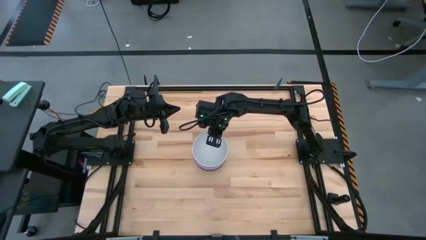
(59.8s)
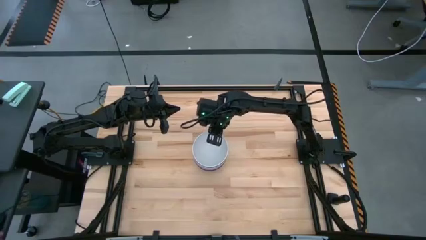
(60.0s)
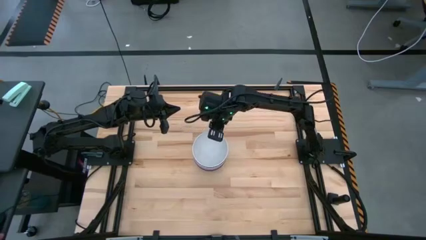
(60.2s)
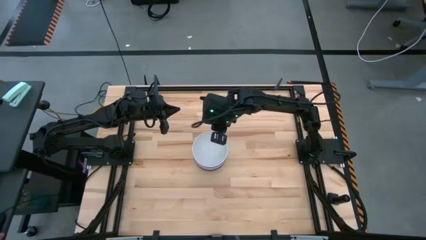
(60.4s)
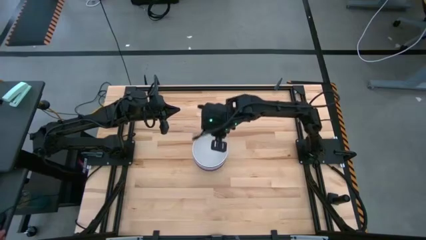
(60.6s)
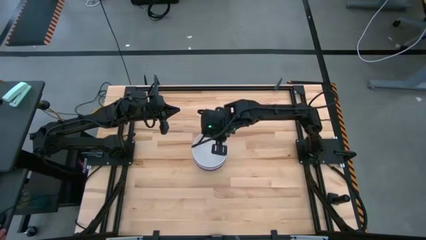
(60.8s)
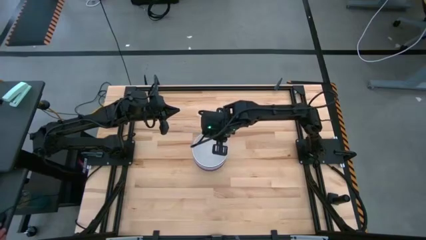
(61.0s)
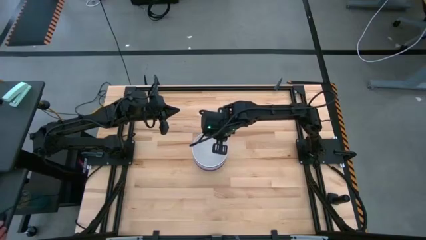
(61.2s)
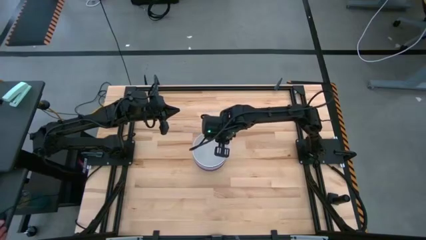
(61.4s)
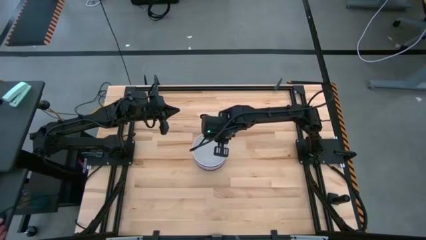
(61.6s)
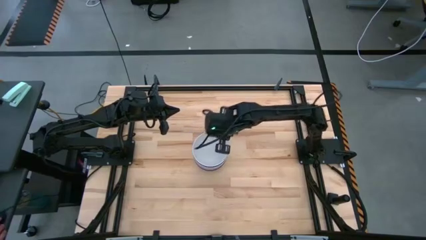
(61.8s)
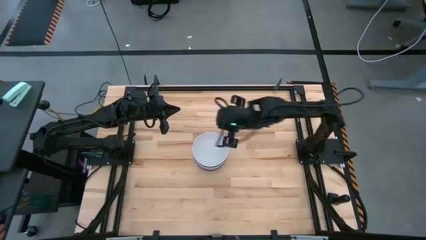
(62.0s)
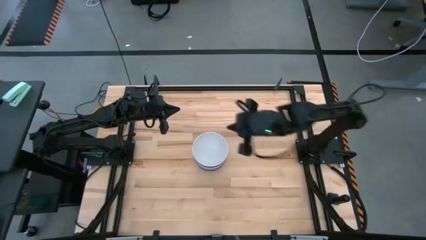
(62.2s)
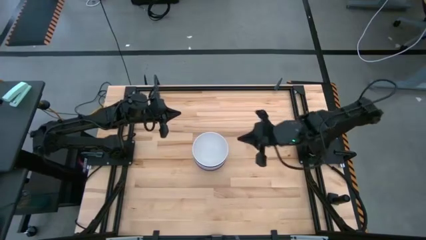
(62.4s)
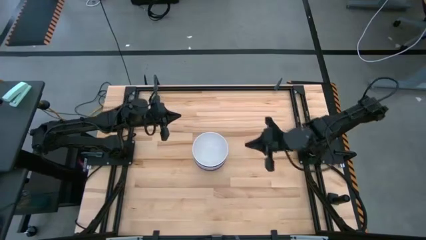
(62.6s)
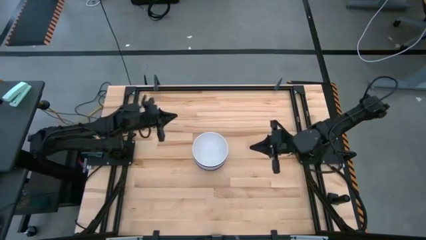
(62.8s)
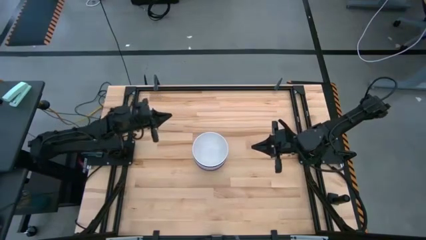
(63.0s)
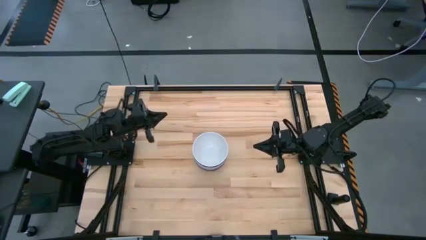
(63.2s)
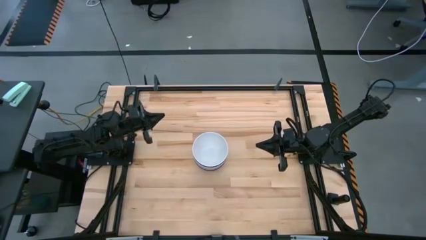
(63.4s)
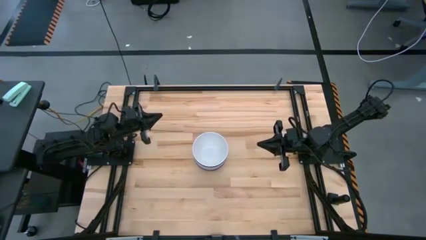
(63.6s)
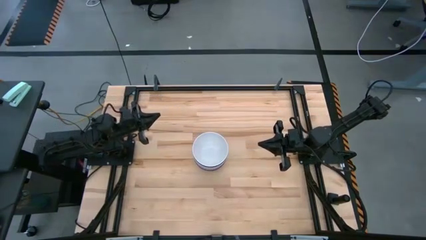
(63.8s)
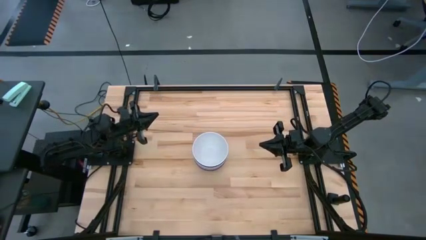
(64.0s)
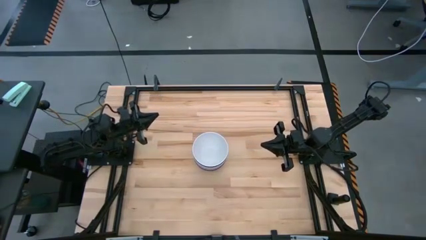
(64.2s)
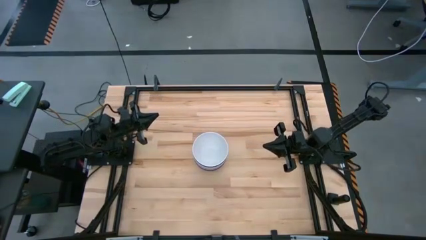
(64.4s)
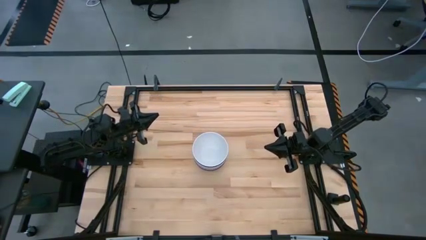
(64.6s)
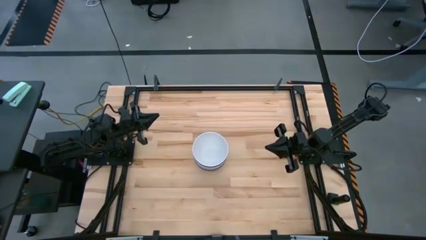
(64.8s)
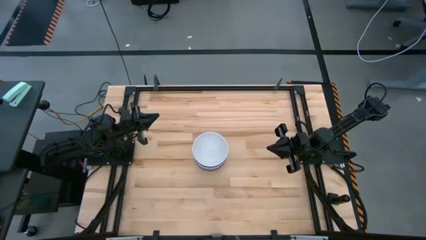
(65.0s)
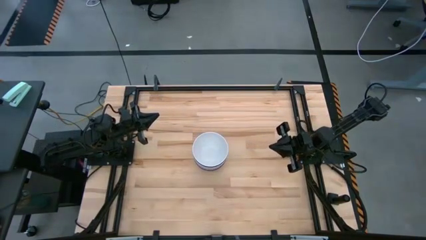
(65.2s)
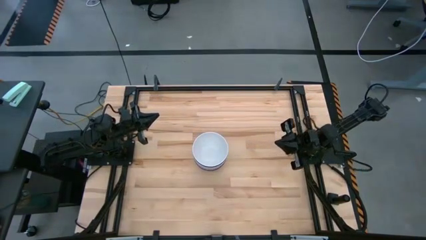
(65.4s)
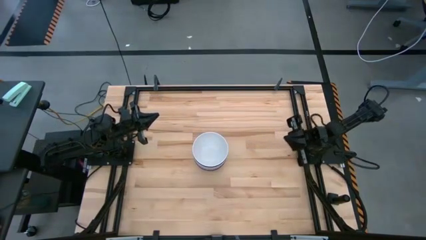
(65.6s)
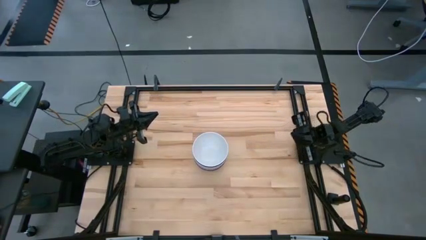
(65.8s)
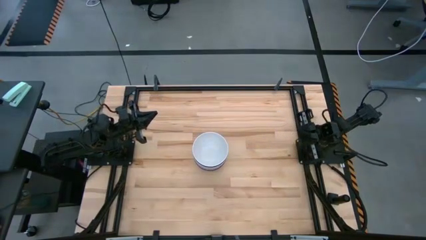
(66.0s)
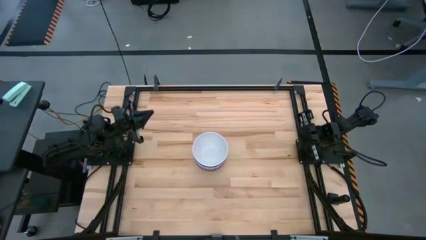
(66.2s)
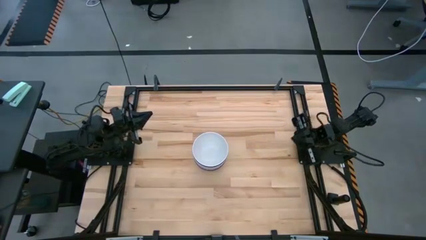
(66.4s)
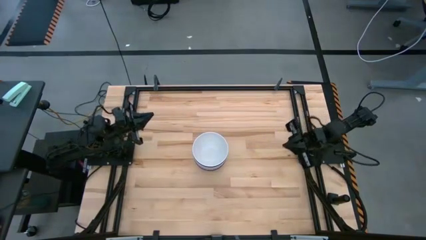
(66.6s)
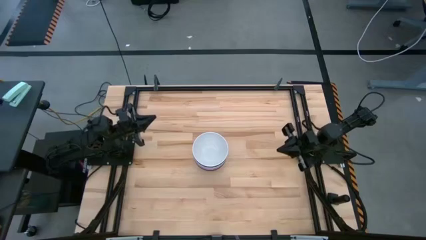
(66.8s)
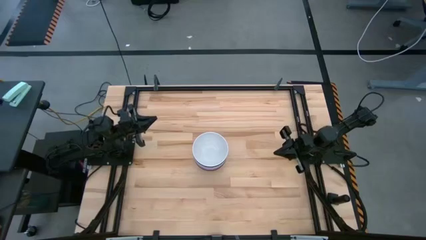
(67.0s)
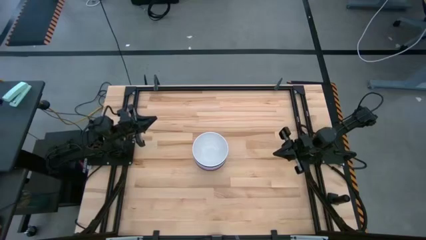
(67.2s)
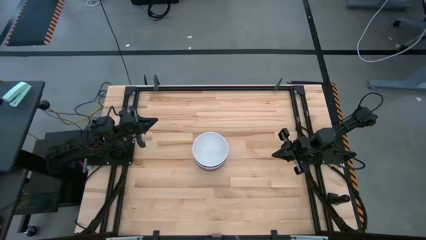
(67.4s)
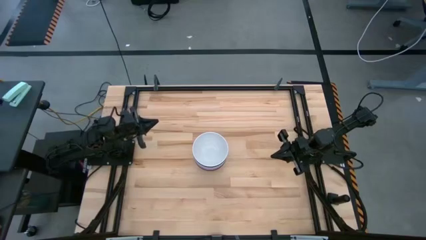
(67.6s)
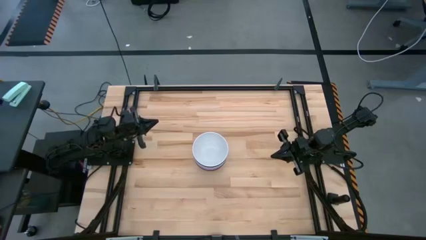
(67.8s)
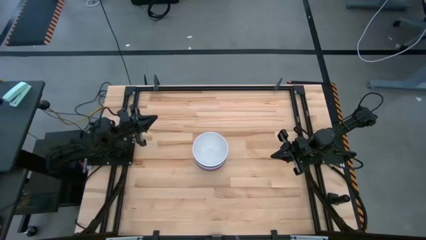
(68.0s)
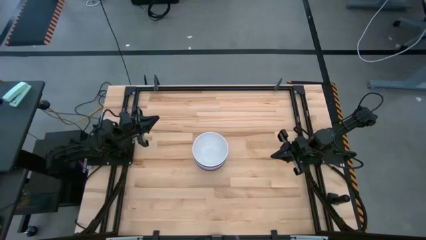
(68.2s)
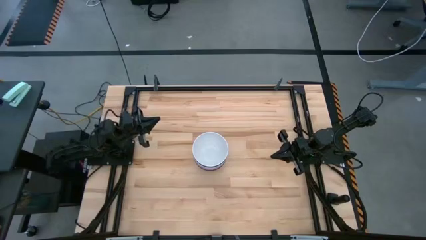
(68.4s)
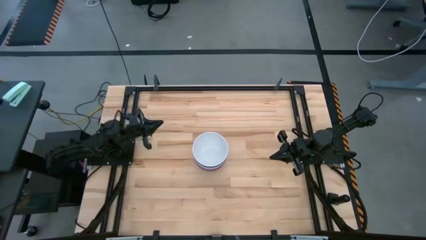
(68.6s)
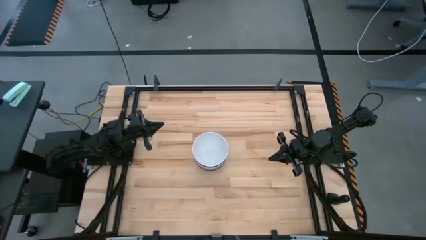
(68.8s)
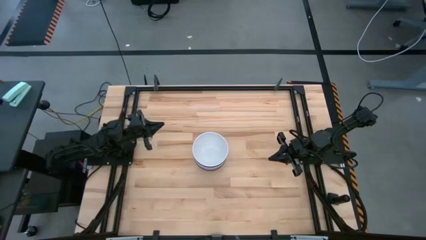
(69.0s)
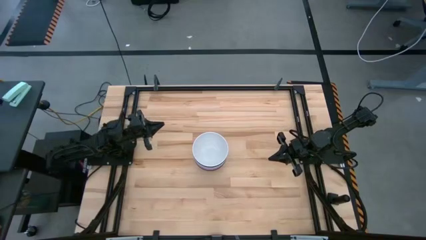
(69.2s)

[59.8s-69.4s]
Task: Nest bowls inside each other
Return to Home Position
